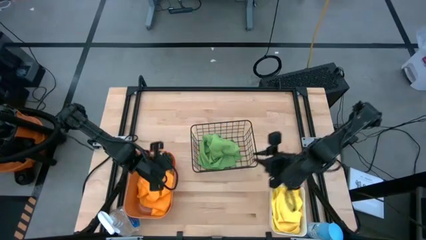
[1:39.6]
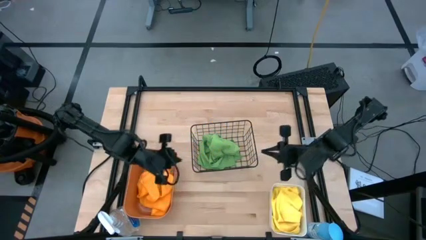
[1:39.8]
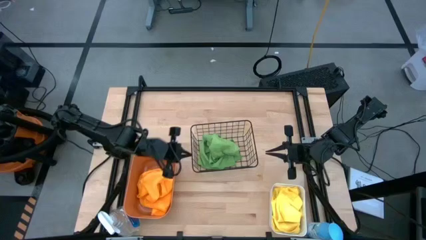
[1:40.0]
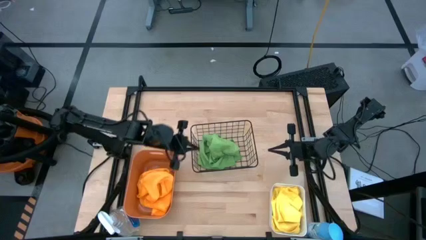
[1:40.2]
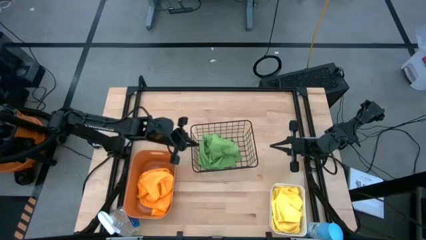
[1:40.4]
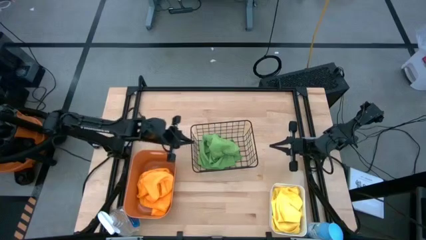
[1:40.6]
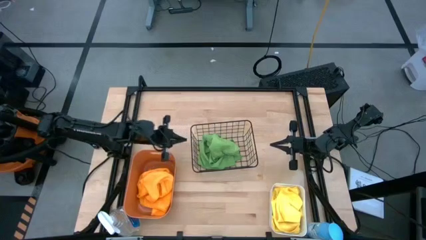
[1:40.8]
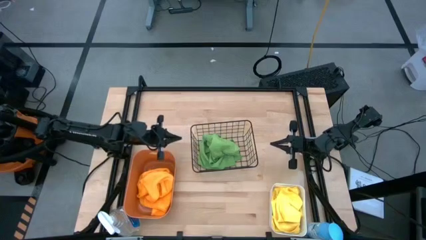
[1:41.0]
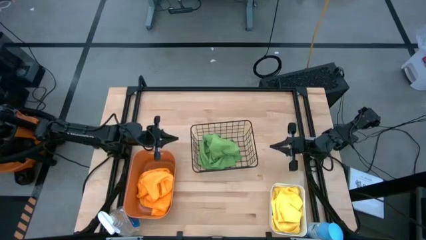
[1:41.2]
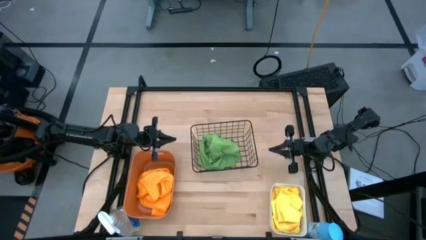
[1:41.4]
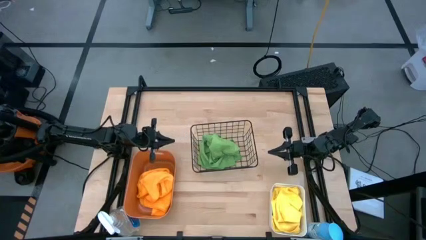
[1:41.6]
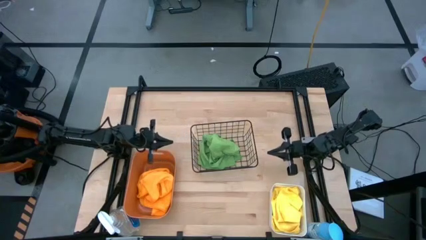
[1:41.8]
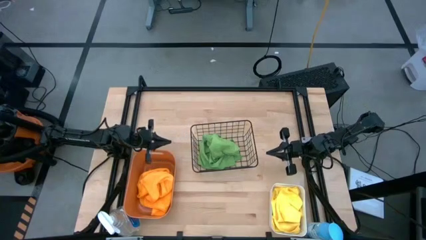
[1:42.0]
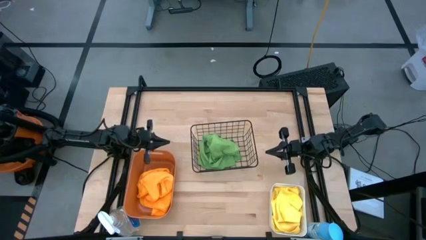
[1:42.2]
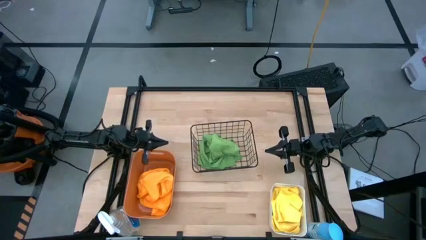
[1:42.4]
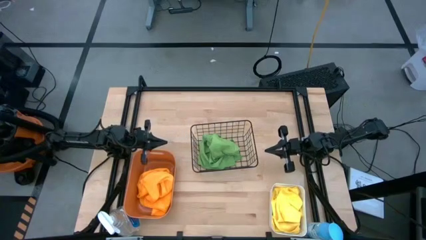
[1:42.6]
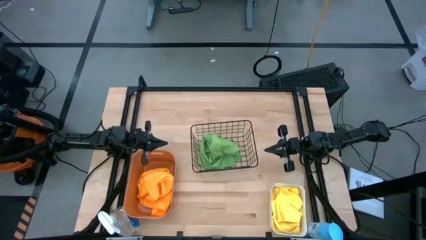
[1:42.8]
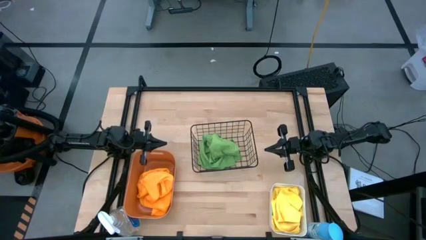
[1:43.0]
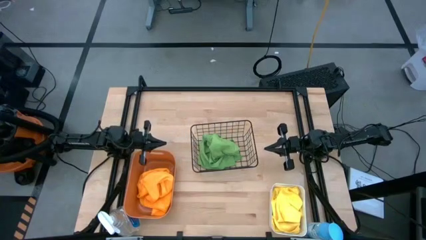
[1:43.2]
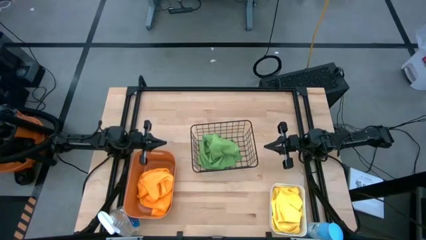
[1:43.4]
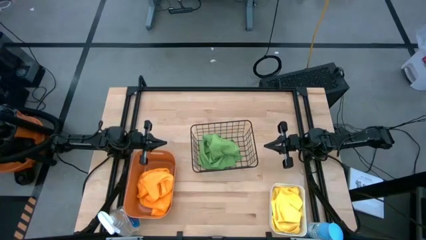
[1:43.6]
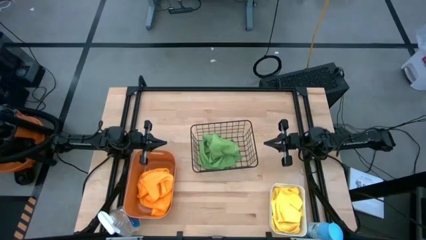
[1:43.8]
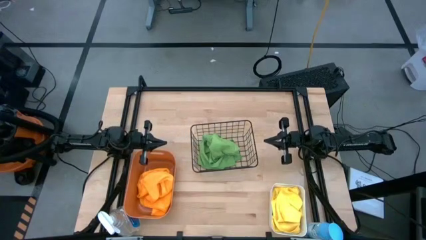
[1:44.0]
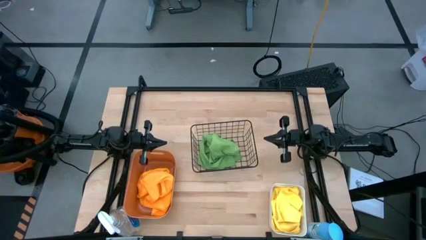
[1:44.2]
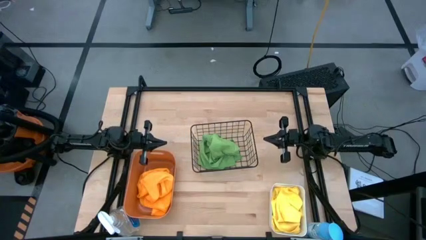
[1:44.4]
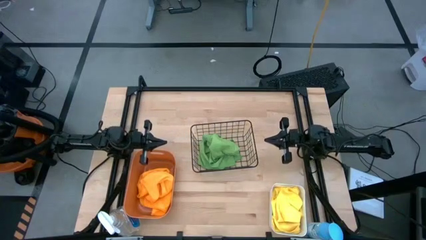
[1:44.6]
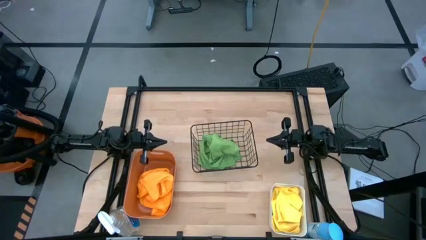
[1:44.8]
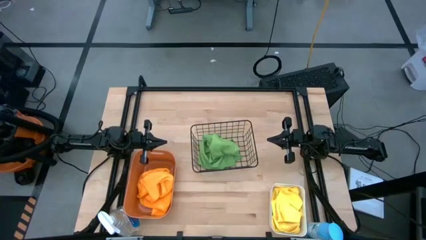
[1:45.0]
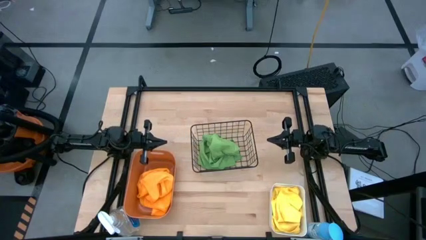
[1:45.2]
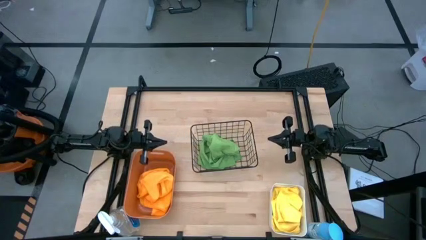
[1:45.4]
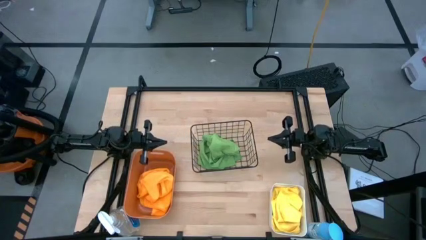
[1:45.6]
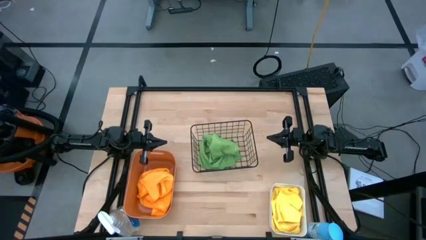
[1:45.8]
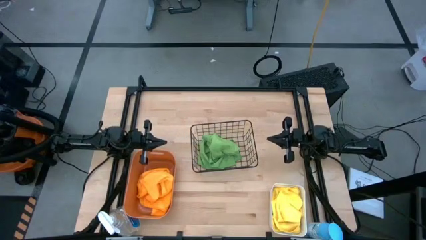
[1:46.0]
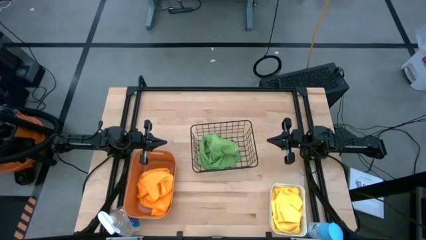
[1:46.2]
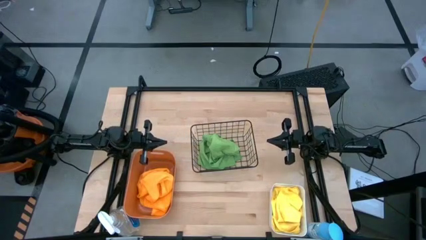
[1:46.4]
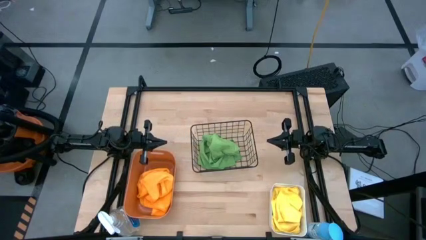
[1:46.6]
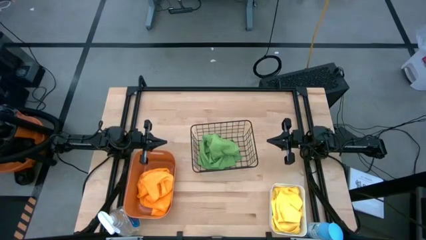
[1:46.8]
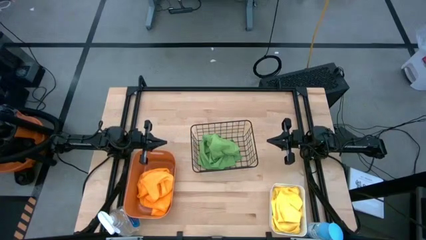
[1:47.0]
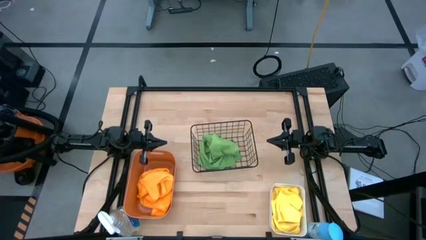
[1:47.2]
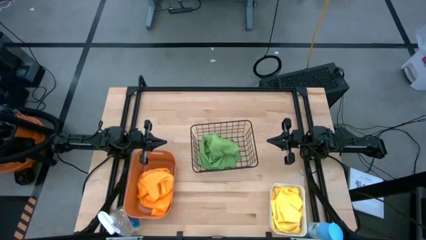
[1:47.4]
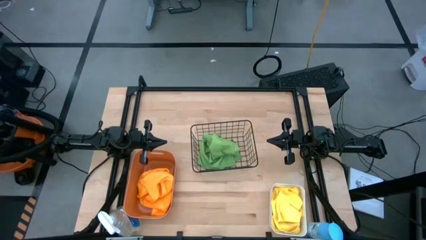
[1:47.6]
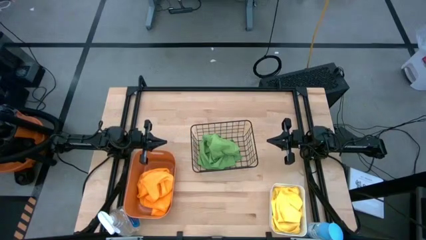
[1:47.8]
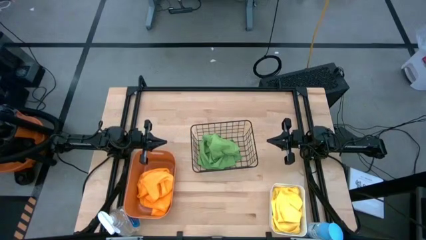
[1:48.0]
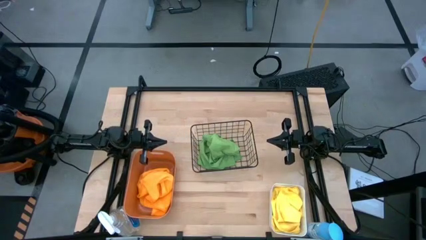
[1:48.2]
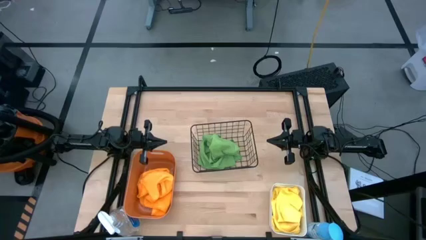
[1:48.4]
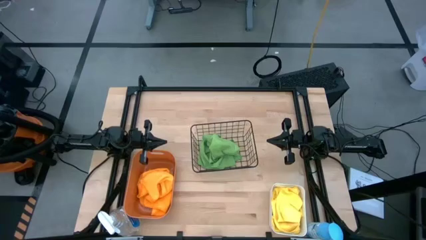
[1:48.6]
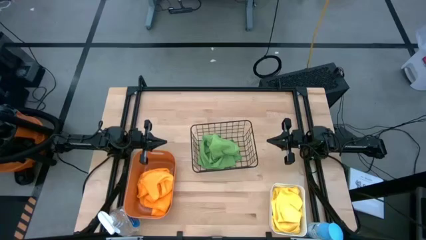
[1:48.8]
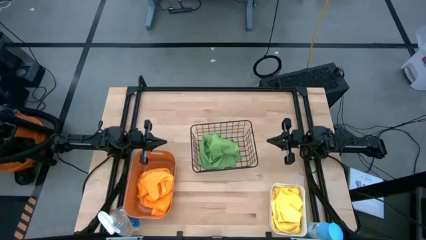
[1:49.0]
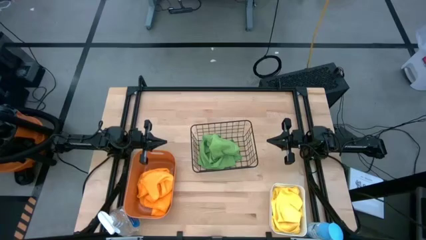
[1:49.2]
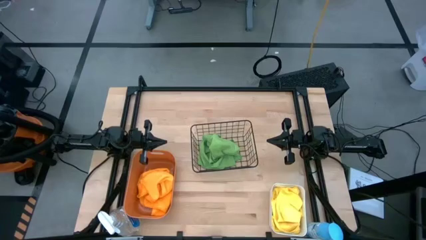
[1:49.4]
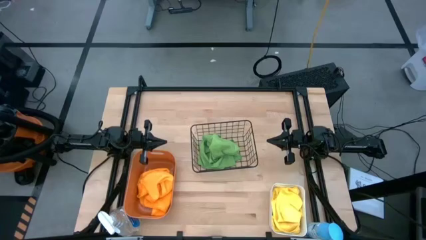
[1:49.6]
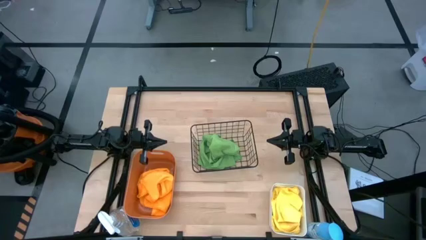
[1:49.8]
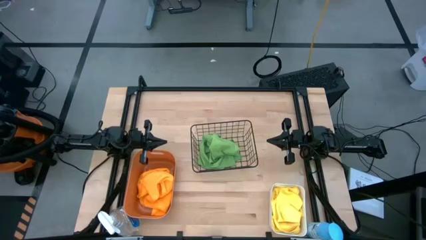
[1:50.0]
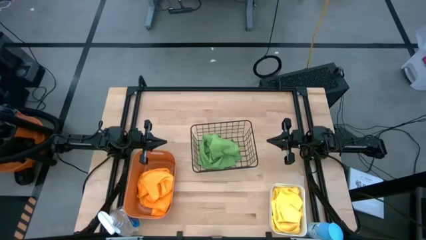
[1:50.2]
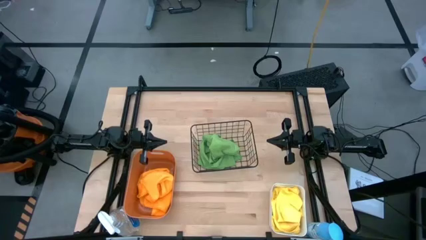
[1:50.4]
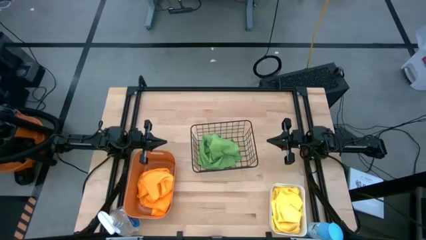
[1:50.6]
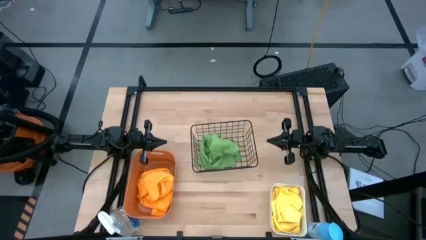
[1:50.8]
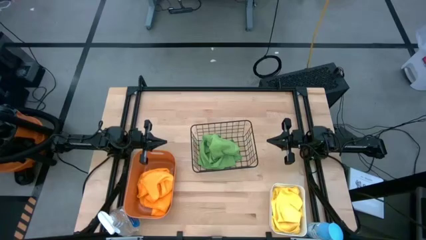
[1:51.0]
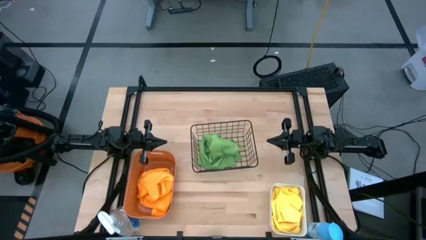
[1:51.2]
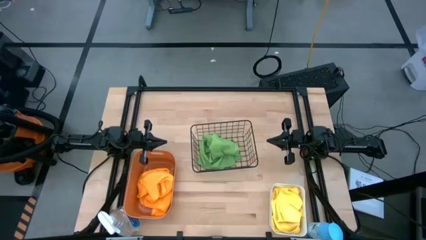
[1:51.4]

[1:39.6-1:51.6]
Task: Sort microfiber towel by color & place in baskets
Return to Home Position

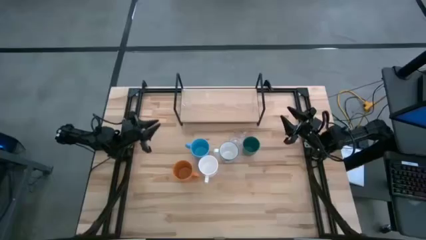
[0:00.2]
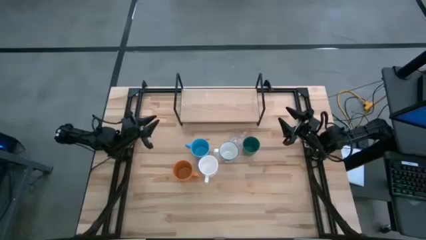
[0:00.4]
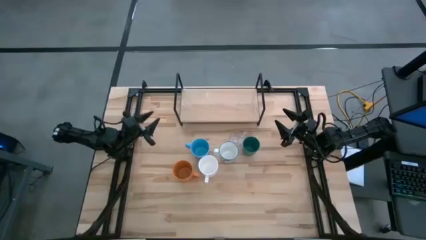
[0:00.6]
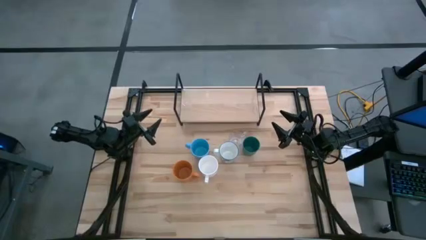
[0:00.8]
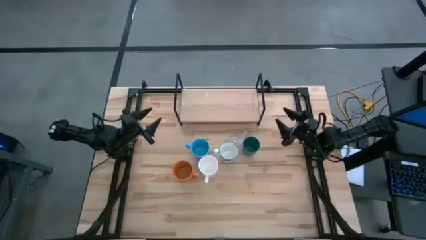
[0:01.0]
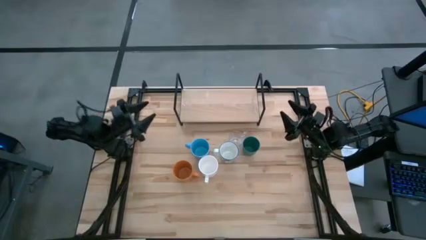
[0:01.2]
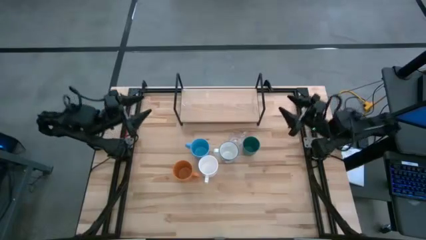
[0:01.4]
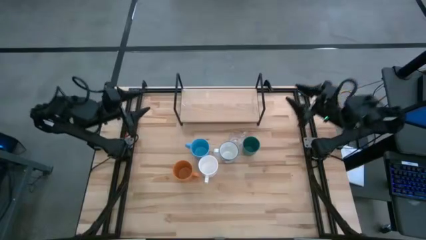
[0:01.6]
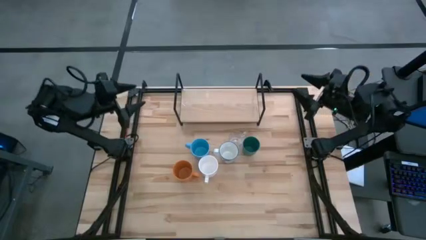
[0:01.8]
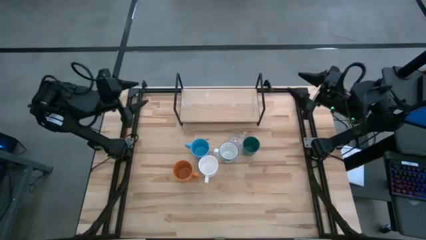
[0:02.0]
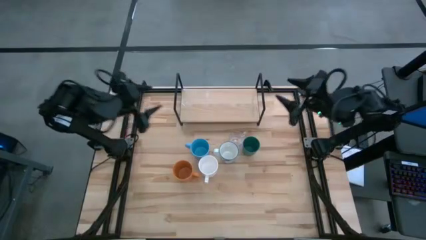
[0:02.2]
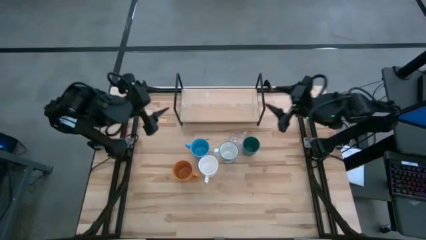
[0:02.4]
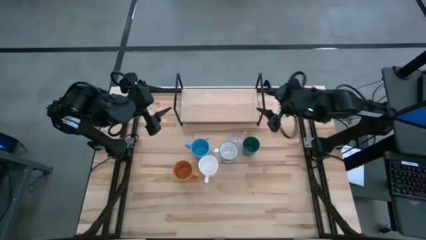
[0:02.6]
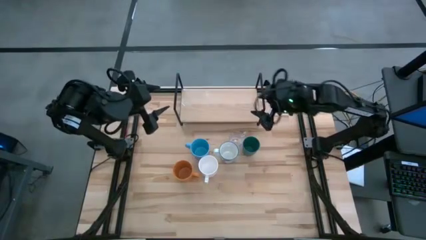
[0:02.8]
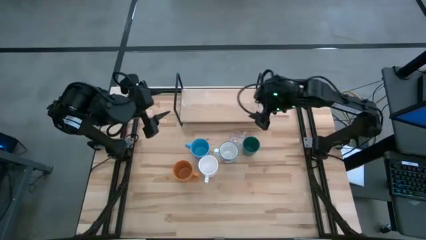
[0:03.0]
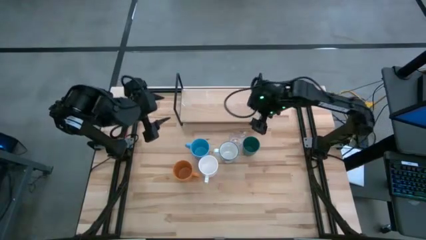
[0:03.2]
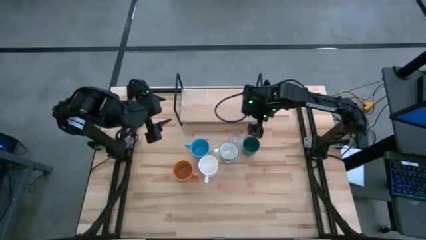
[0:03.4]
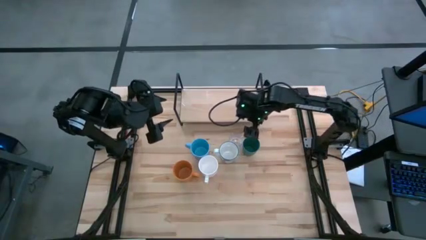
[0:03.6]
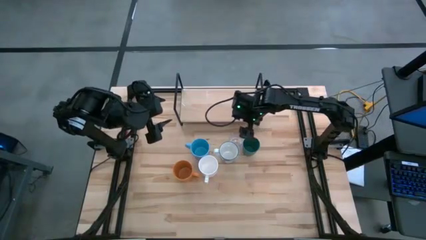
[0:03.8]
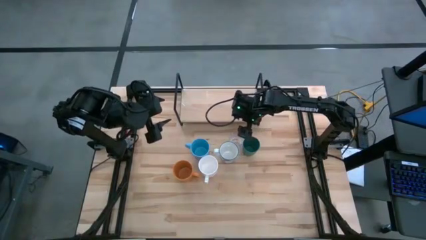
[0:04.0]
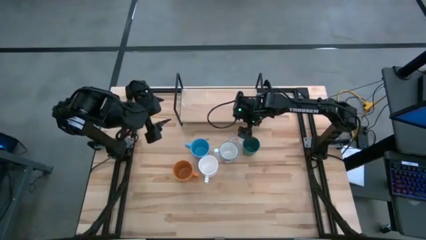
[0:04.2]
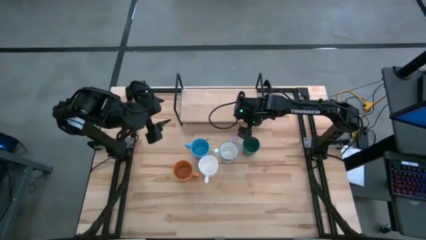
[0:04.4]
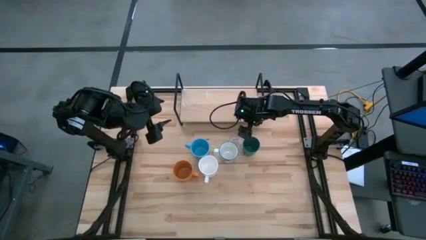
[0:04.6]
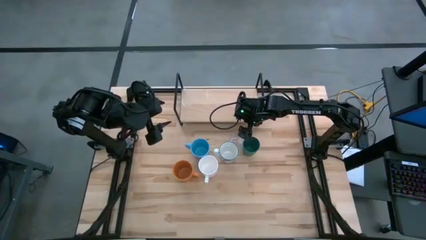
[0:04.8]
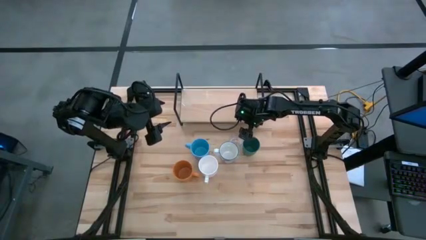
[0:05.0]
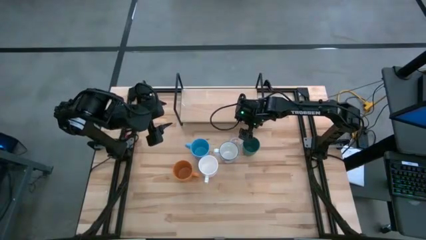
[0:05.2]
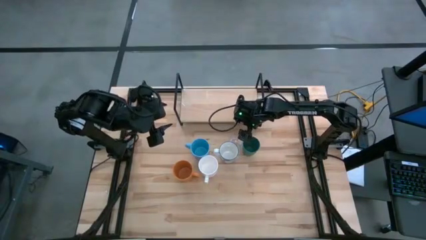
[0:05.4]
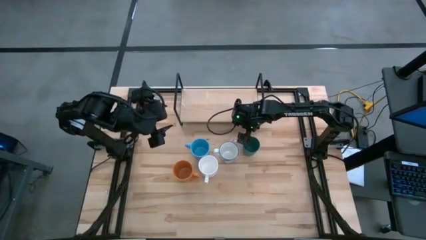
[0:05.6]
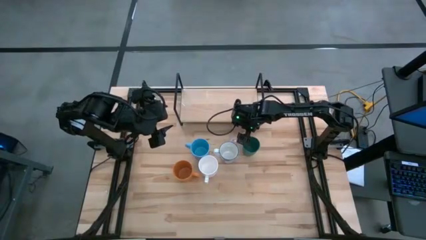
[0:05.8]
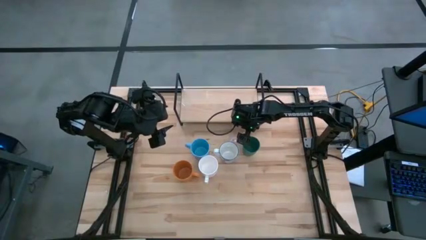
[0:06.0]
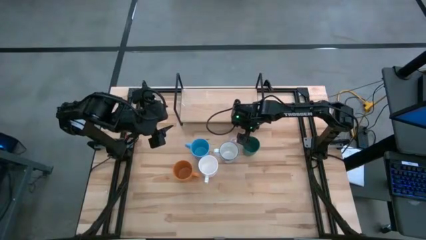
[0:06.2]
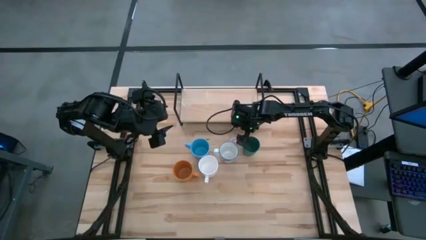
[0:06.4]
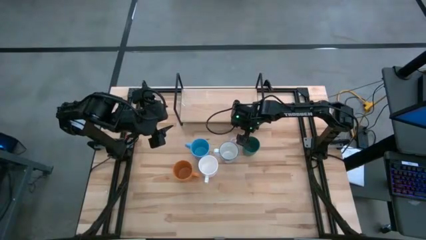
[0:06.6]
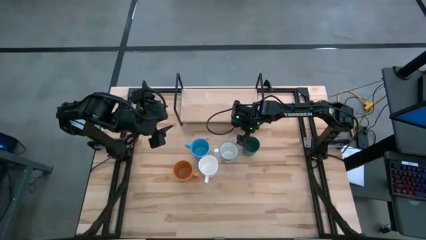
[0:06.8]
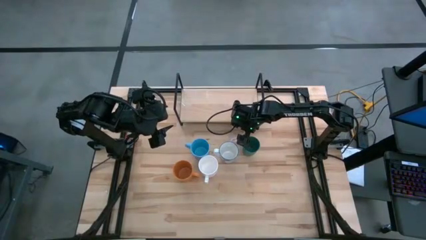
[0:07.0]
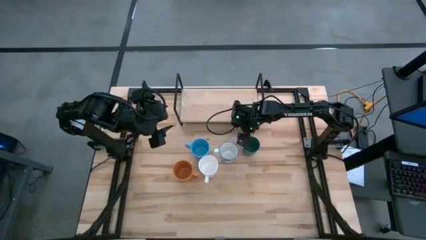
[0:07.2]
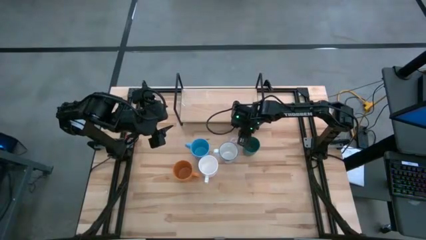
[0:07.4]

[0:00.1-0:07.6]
Task: Stack small to large cups/mugs on shelf
Put the transparent mug on the shelf
